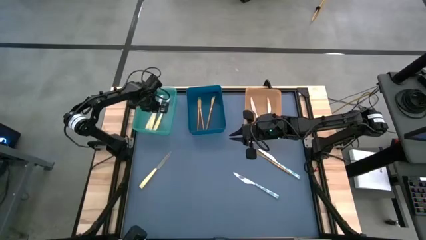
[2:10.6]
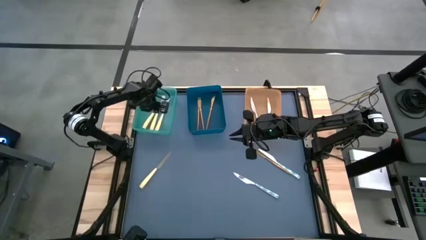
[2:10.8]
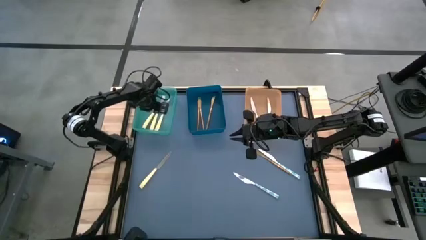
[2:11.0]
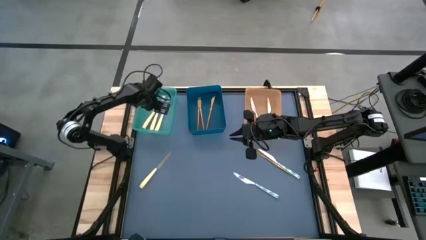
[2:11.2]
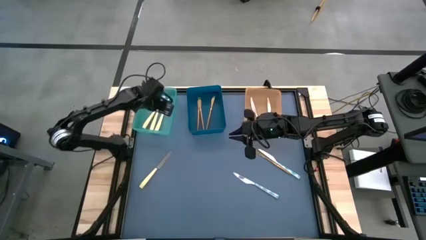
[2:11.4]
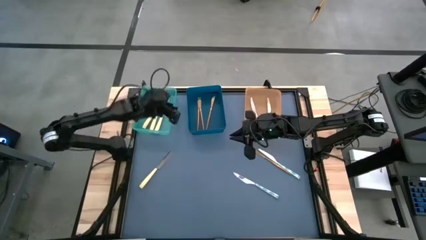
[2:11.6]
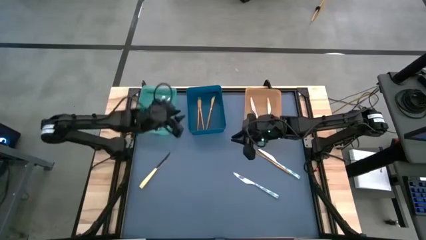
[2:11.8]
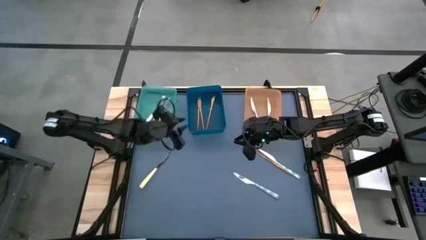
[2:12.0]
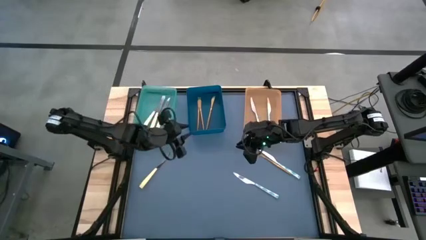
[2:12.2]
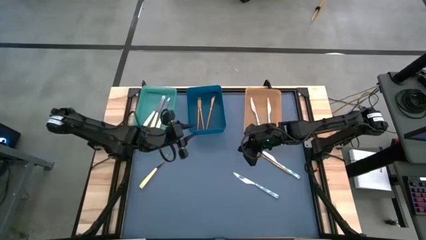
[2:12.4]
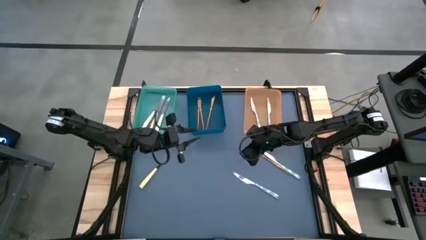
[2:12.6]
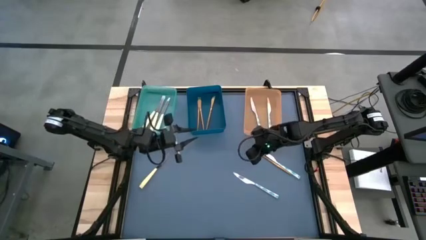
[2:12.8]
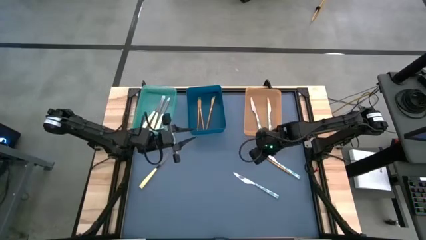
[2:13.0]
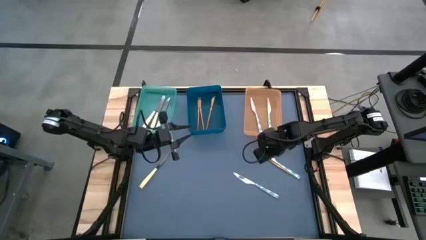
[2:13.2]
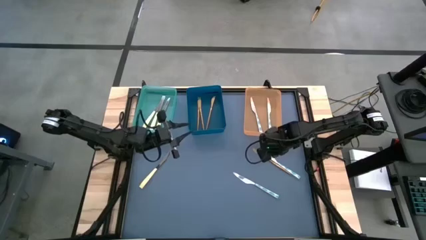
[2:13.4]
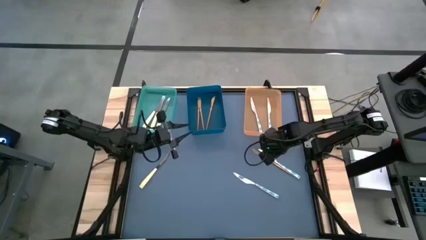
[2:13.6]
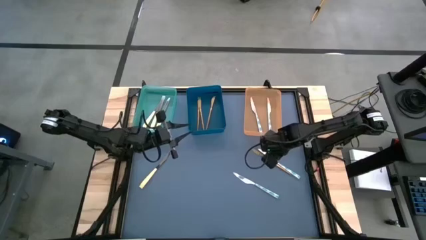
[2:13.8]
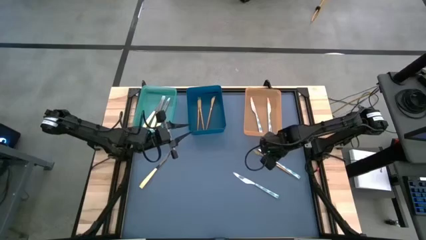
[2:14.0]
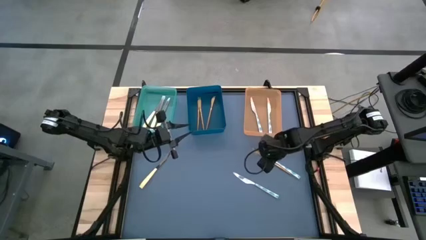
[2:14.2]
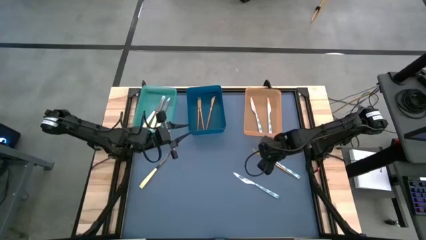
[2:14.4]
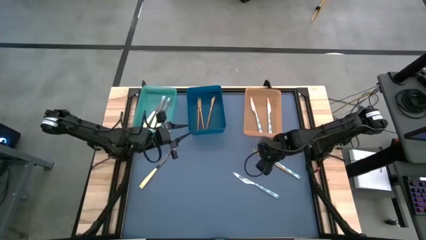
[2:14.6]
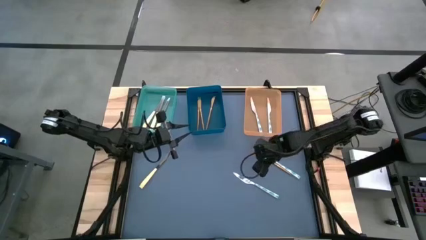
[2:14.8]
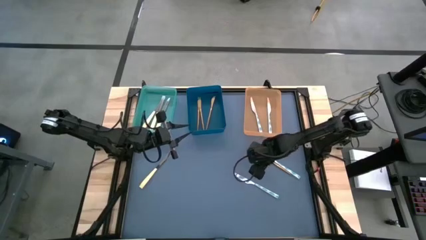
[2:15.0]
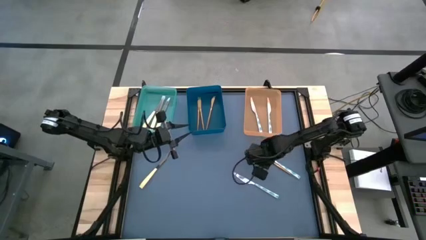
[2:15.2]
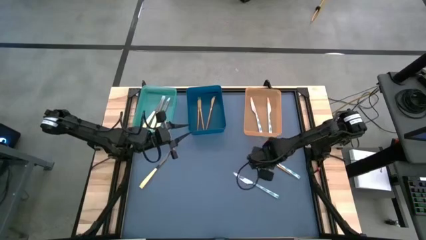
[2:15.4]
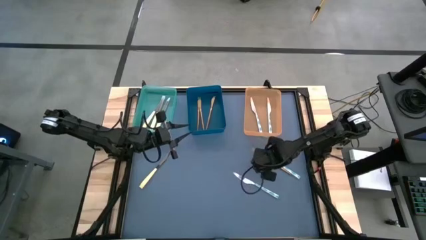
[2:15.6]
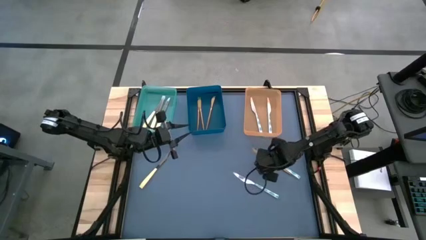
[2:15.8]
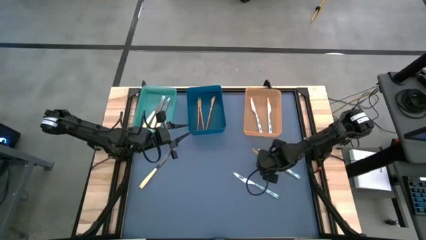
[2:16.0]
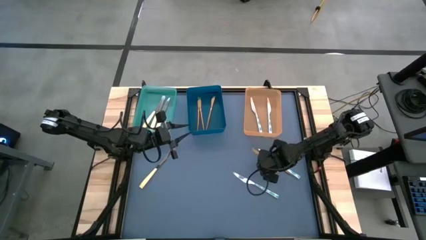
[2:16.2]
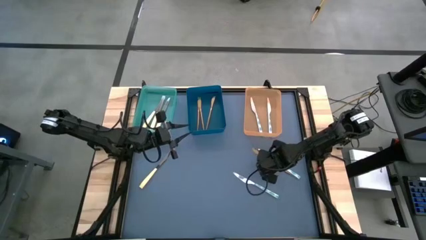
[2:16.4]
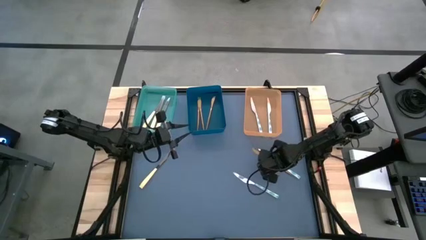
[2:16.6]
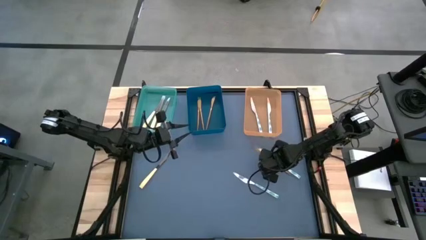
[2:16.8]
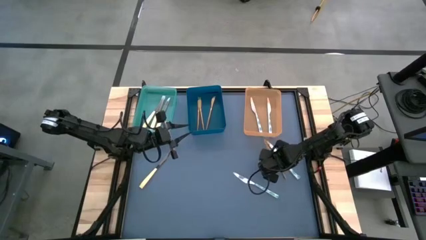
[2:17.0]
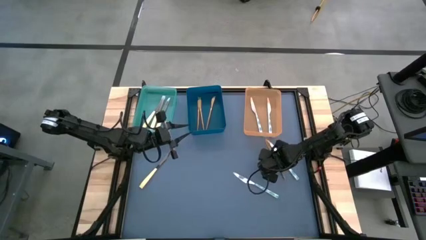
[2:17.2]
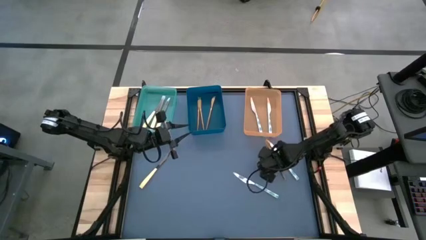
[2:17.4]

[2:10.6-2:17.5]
Task: Sort silverware by color (type)
Put the gold table knife into the blue bin

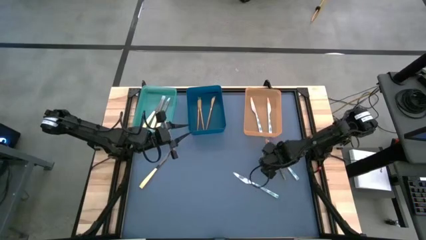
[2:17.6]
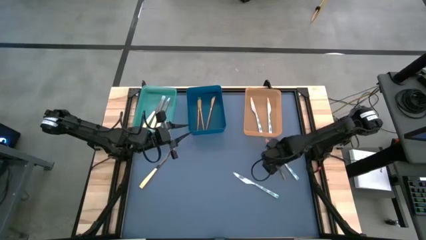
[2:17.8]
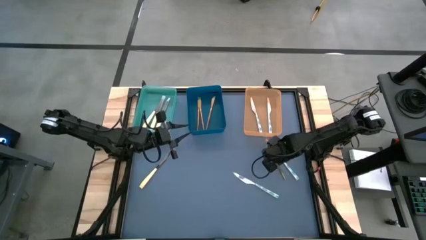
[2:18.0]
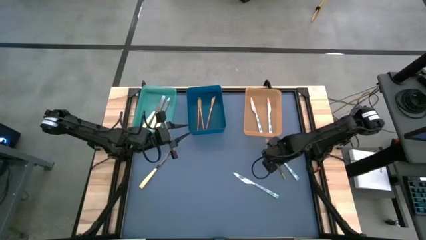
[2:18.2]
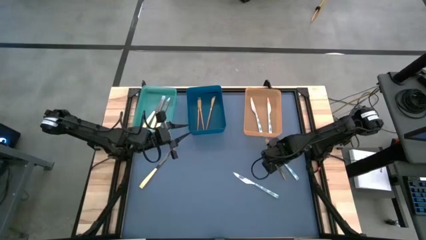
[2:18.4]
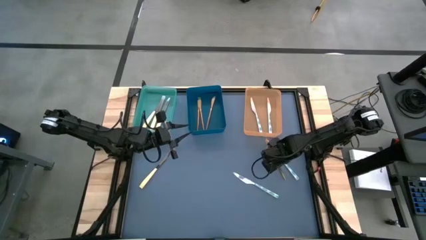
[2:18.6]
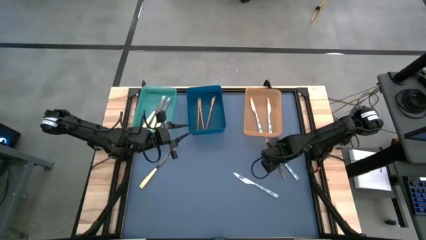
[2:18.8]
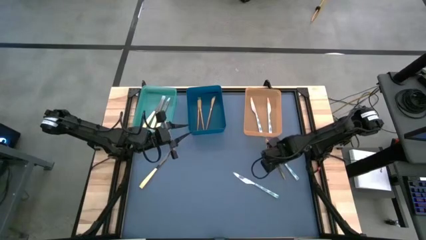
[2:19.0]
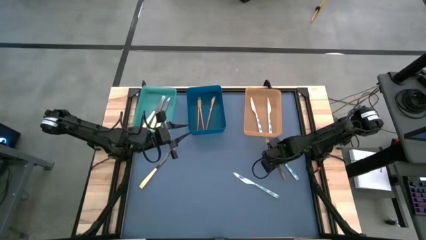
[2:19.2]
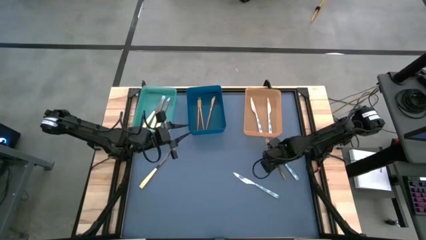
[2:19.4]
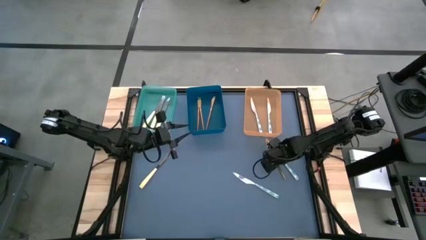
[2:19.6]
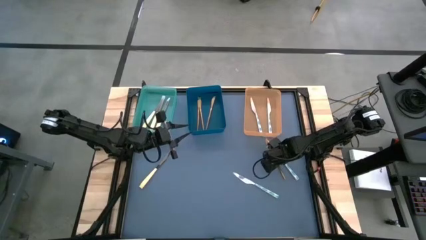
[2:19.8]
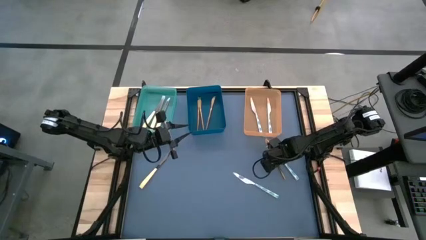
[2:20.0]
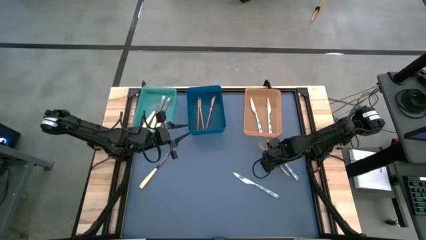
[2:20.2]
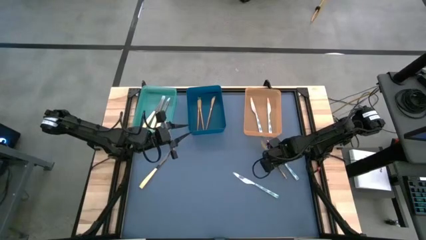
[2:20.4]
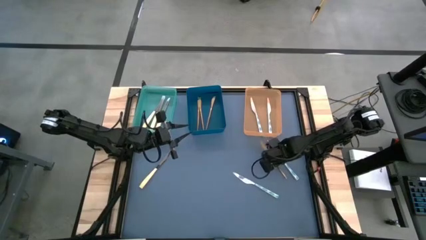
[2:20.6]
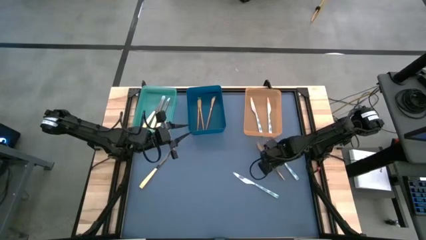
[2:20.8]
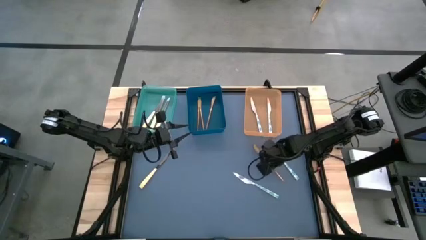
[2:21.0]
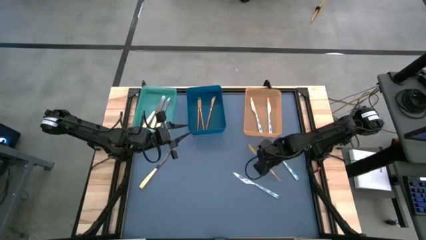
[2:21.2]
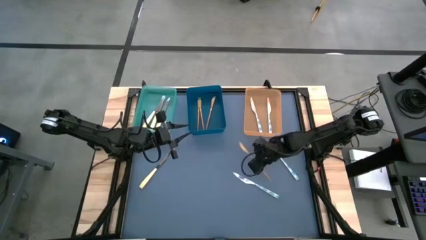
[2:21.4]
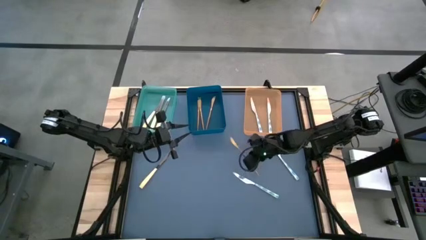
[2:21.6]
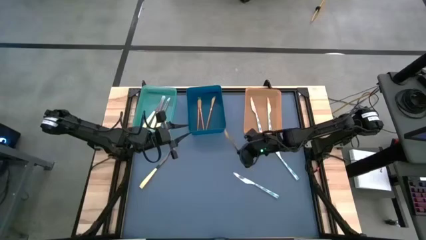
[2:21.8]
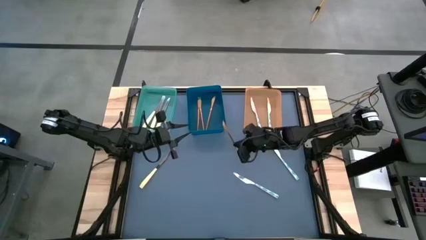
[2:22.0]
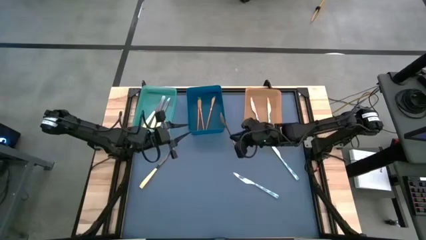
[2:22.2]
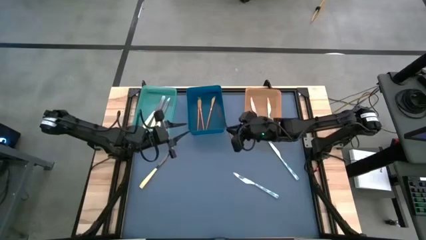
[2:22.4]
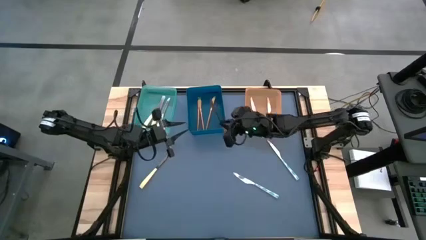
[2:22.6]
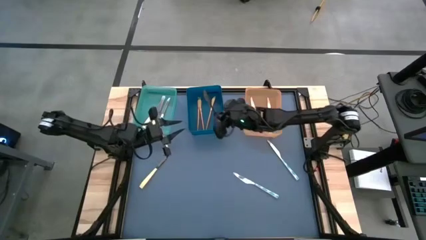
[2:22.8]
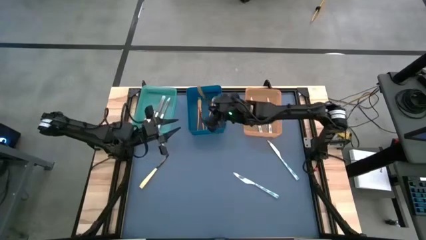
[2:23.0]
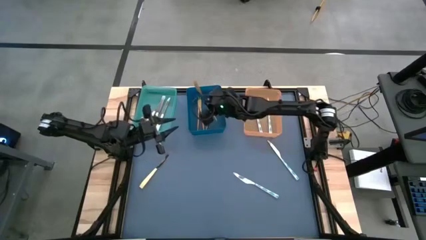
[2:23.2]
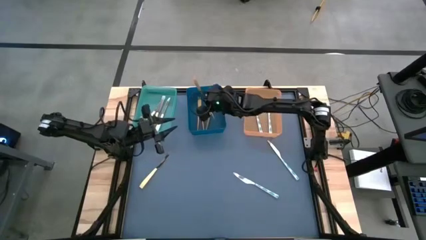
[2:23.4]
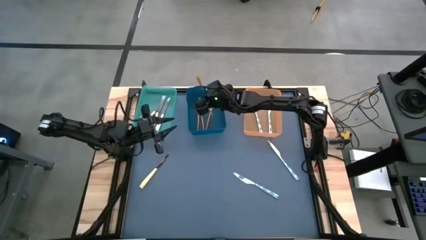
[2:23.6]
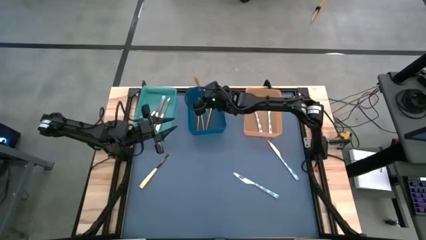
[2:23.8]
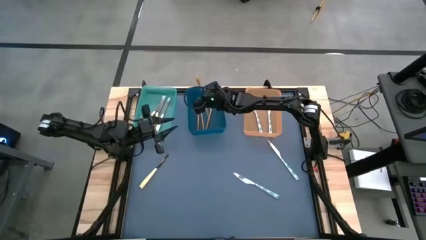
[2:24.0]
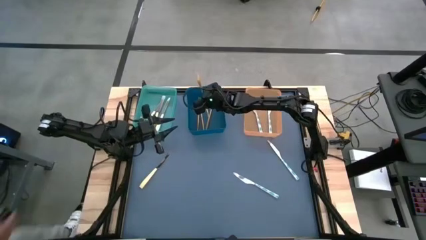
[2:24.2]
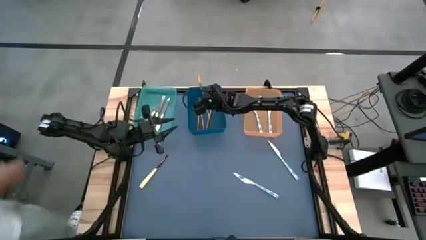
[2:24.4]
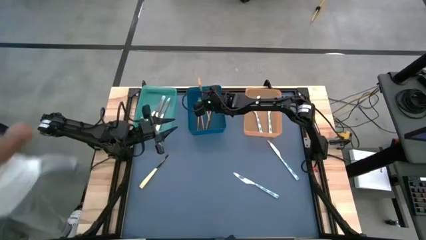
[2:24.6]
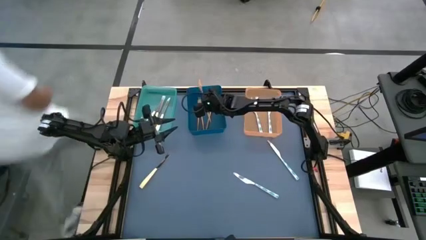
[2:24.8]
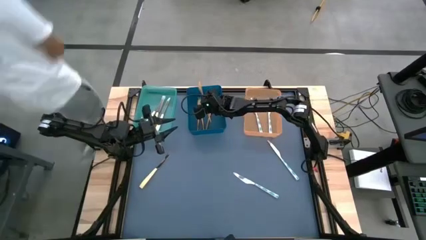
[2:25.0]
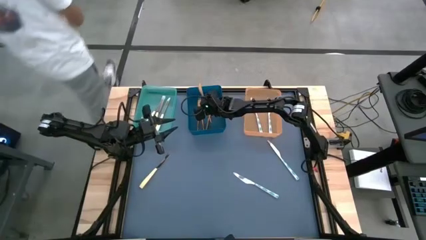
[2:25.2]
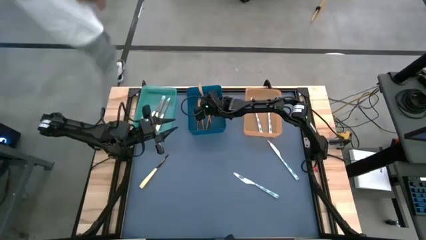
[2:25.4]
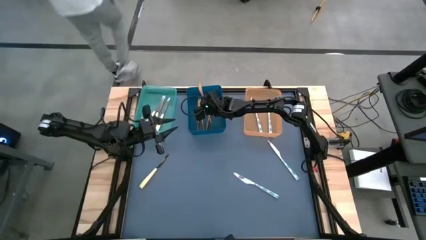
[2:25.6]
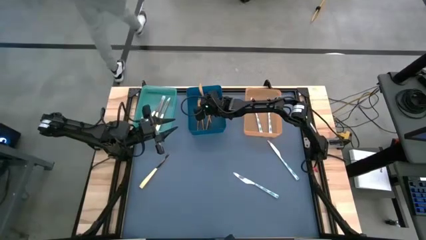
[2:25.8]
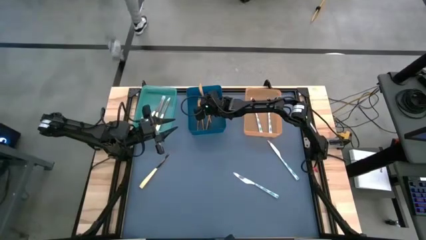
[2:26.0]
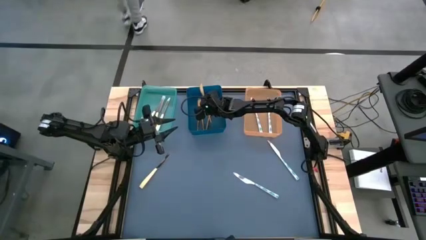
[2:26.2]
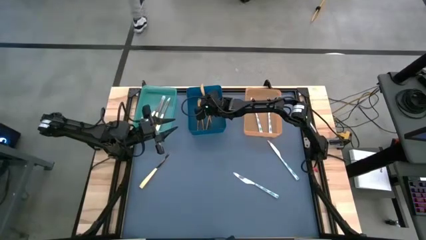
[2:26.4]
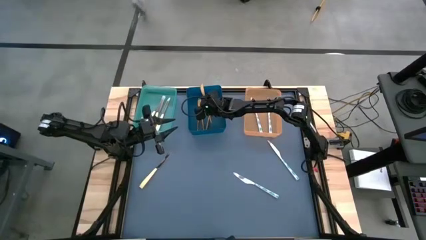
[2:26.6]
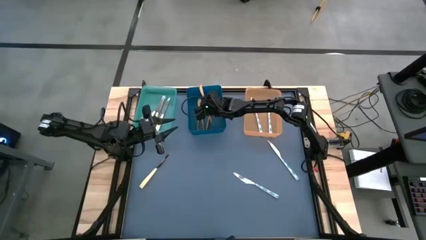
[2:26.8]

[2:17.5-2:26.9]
Put the gold table knife into the blue bin
